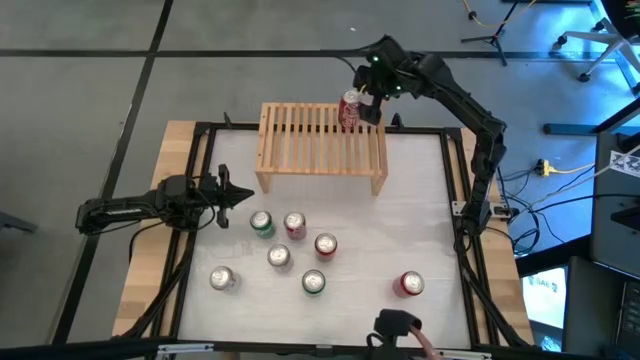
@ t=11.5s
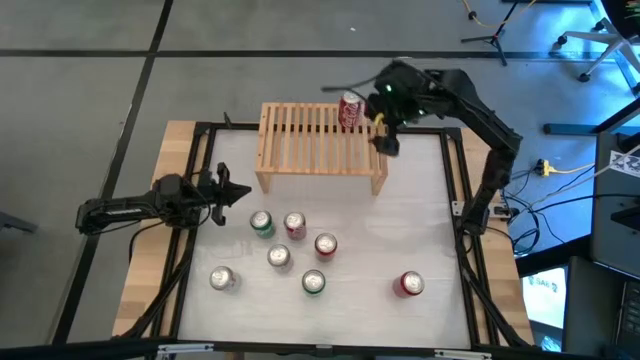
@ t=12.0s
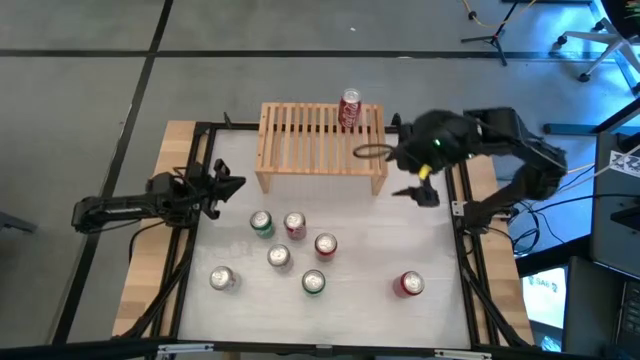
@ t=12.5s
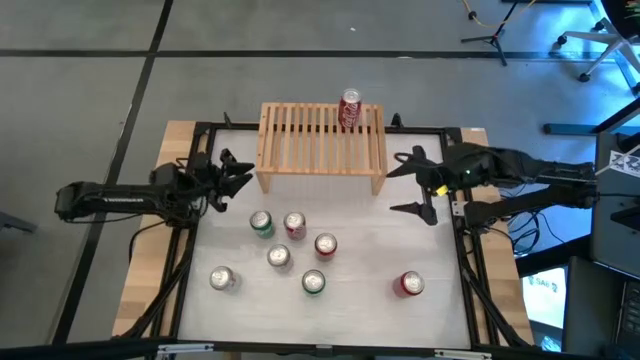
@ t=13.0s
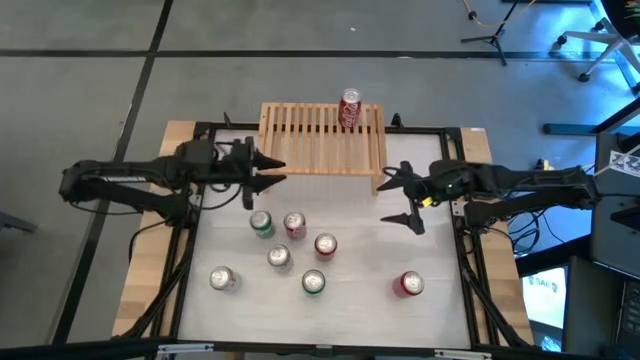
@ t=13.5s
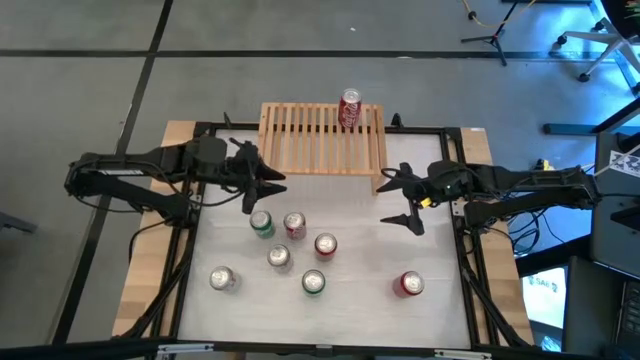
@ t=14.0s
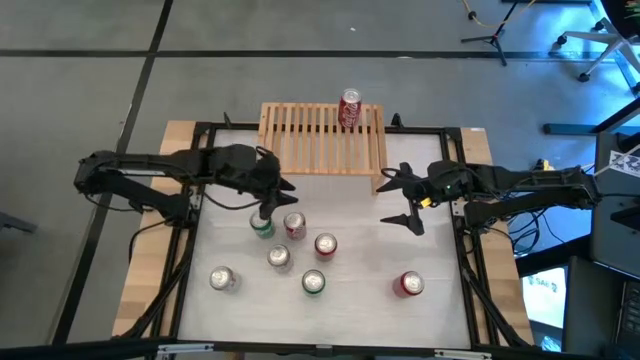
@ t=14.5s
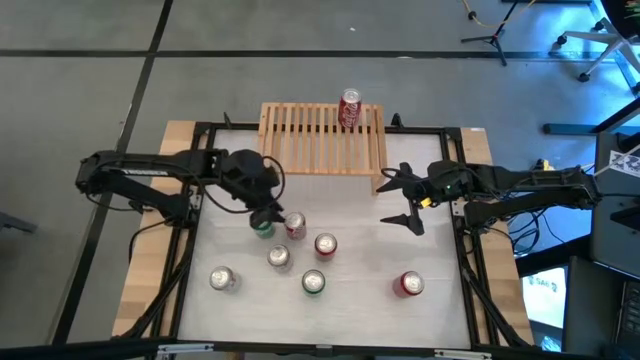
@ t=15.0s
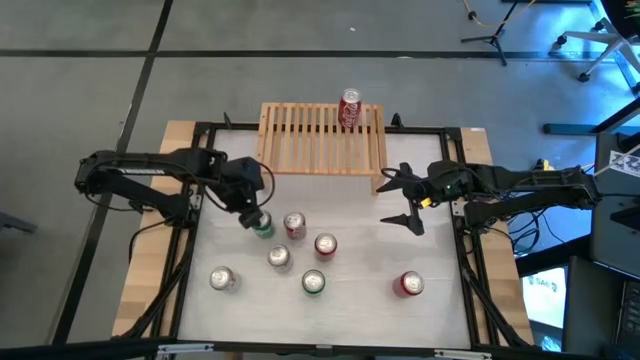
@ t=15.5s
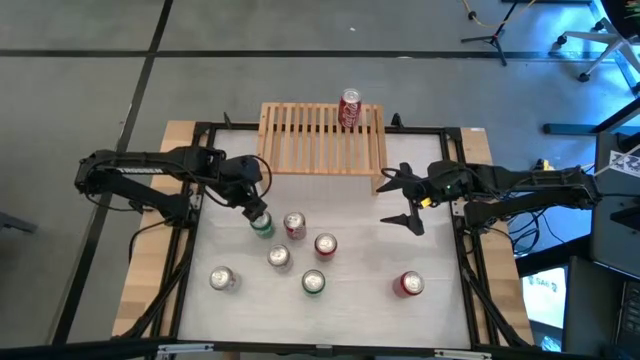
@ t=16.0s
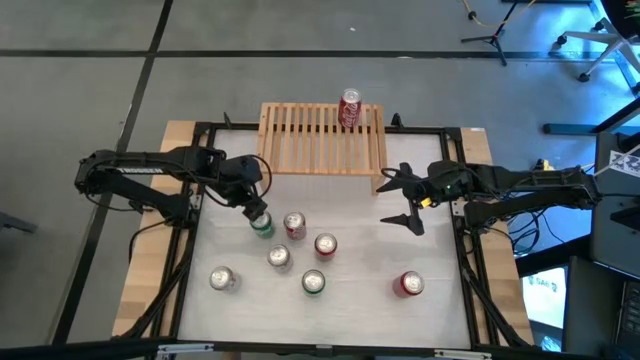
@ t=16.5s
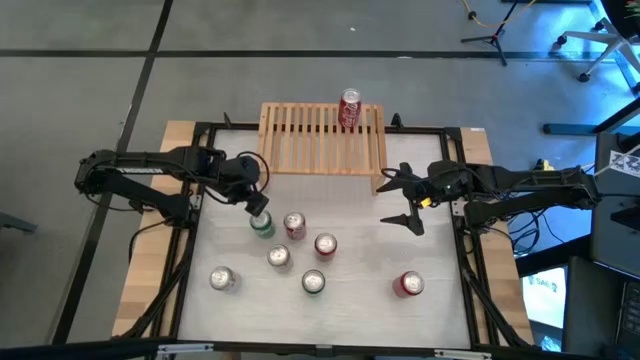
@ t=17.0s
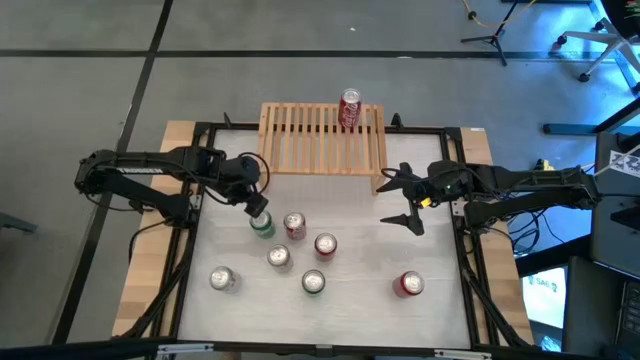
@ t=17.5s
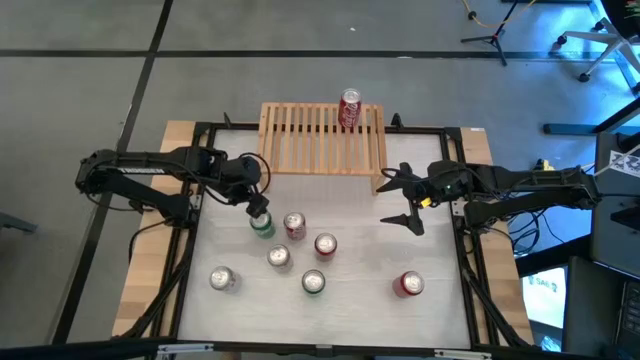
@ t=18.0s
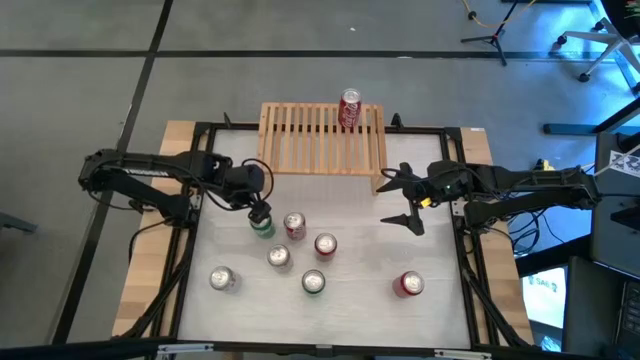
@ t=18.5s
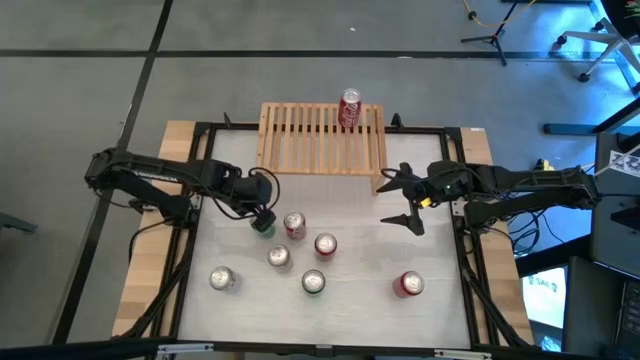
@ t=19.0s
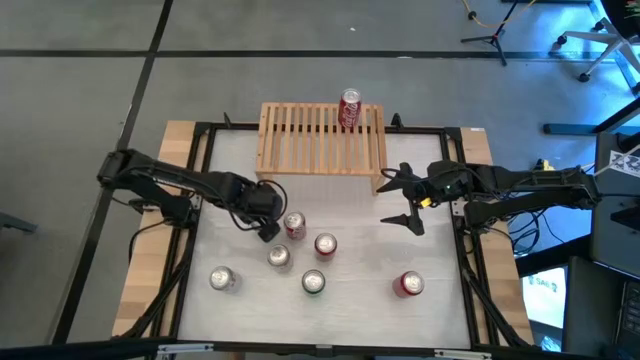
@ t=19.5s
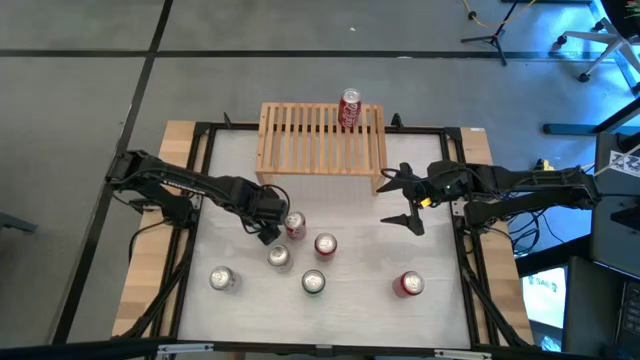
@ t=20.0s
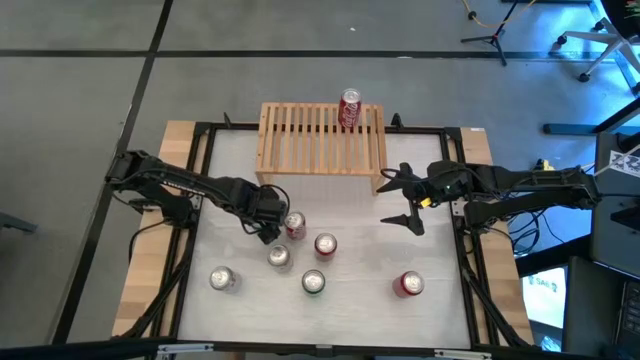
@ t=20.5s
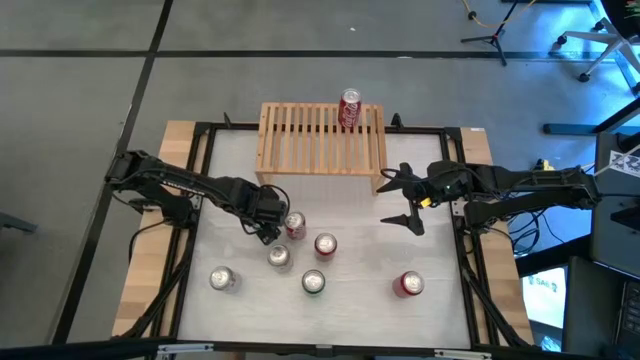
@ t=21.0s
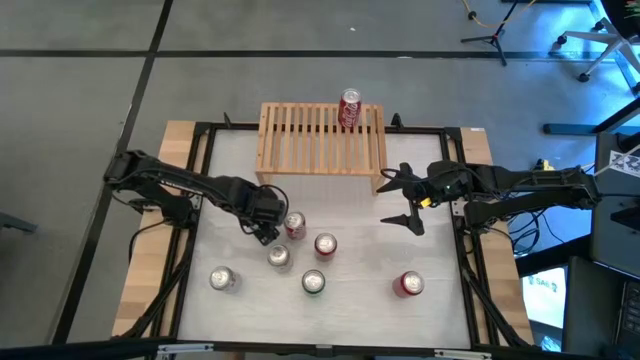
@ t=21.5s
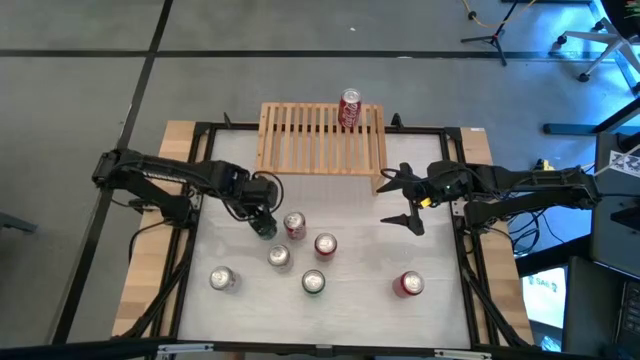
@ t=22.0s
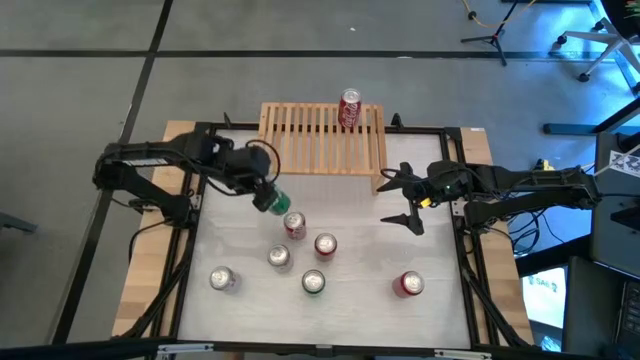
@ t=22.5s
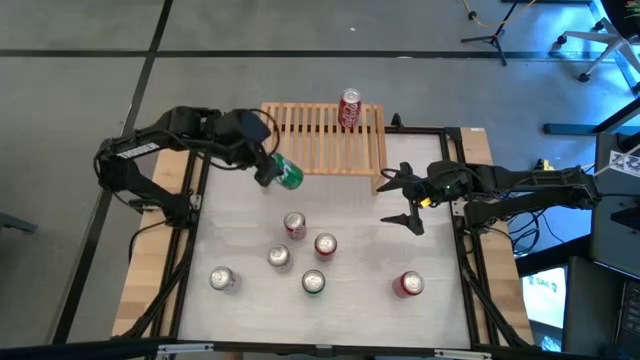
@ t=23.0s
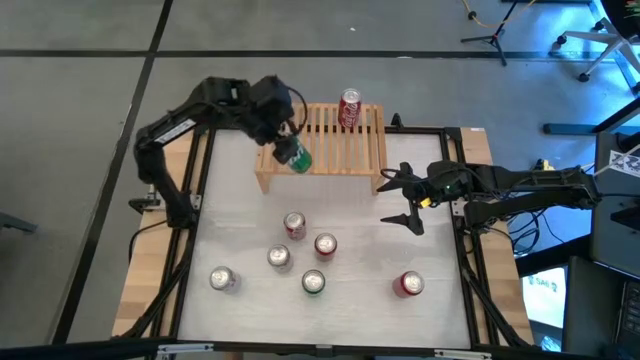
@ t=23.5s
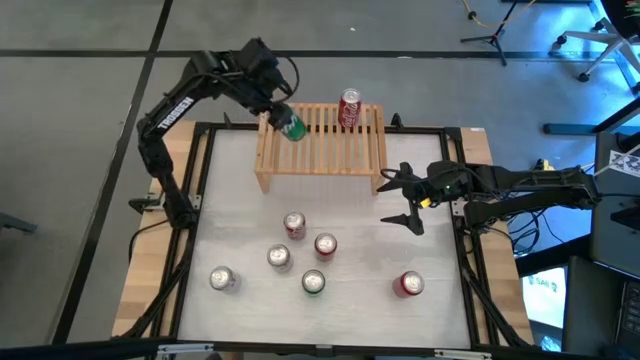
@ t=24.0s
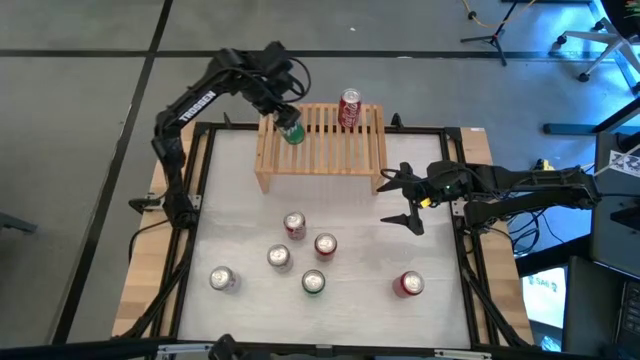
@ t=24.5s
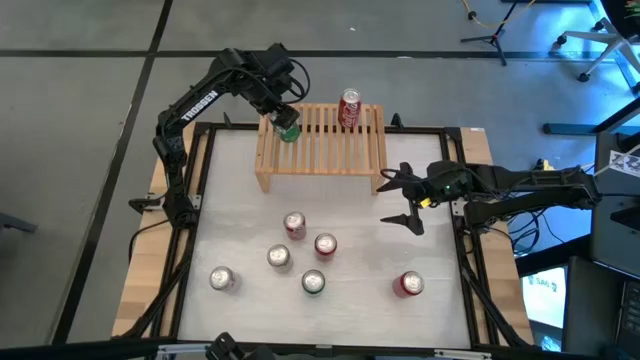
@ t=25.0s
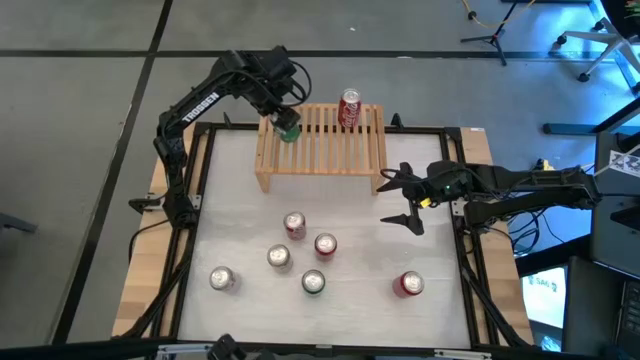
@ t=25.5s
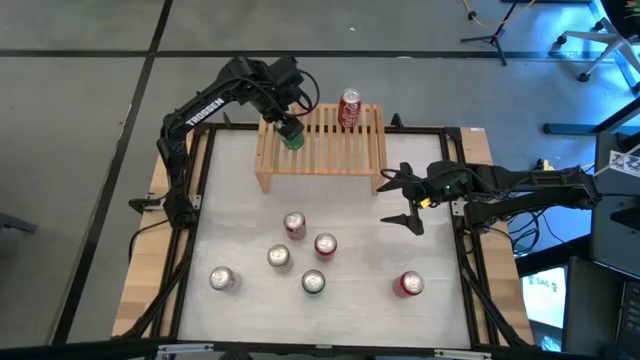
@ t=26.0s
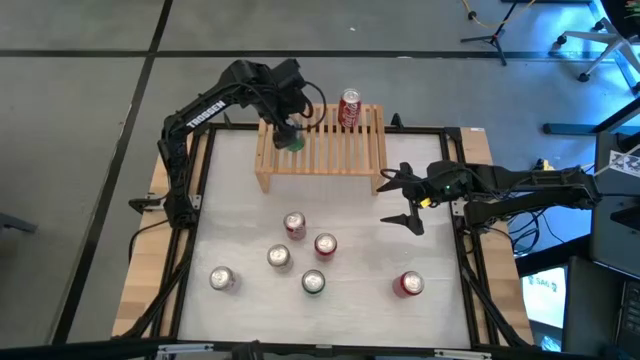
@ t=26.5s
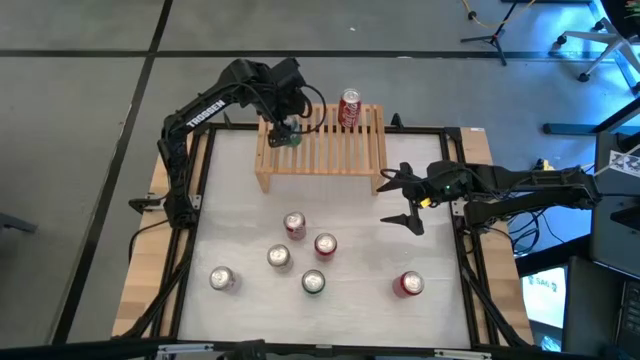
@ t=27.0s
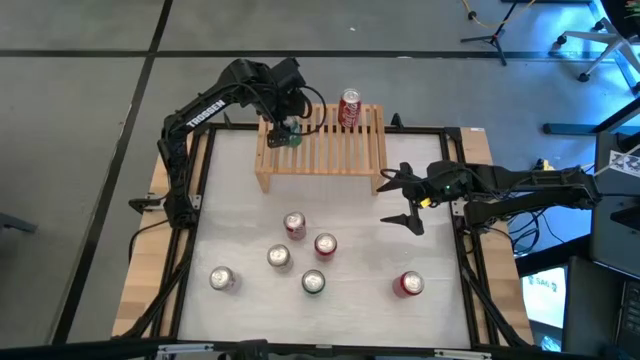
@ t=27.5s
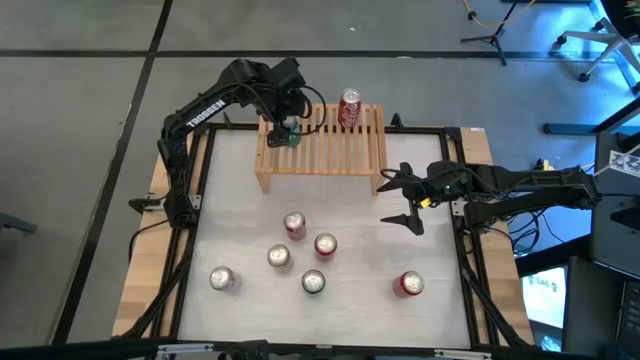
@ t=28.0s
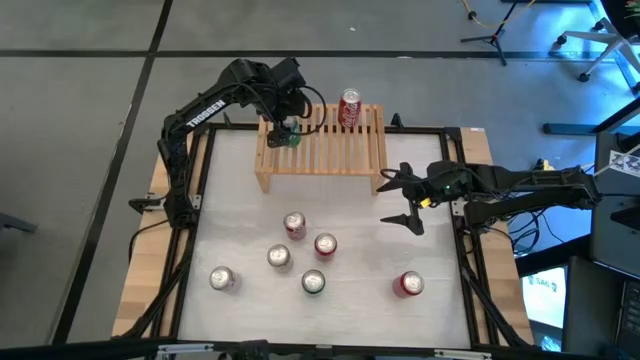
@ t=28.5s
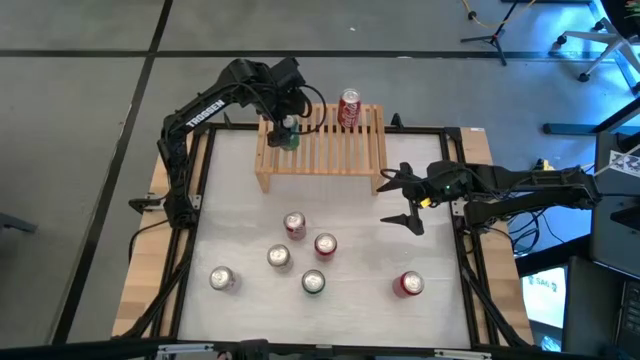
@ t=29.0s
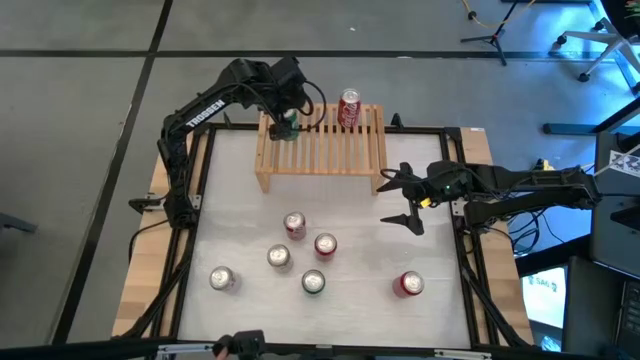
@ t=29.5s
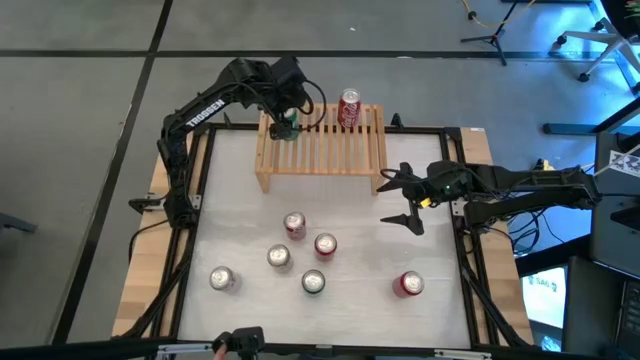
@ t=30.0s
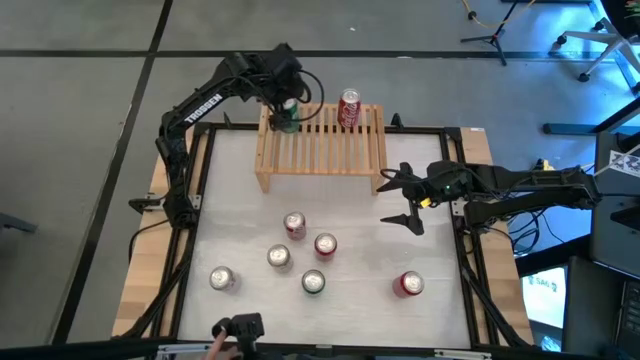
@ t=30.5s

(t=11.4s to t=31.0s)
Task: Place canned beverage on shelf
Put the top green soda can on the shelf
